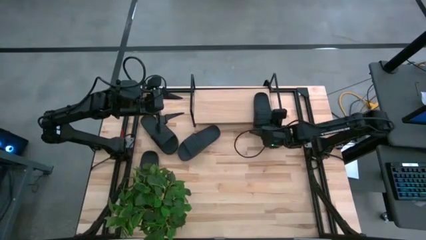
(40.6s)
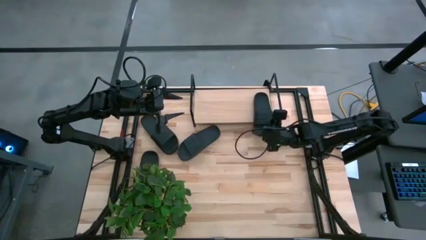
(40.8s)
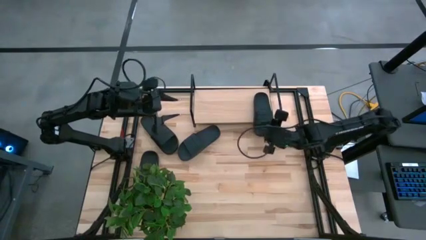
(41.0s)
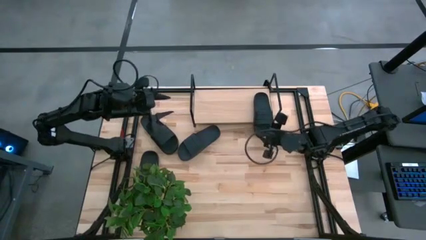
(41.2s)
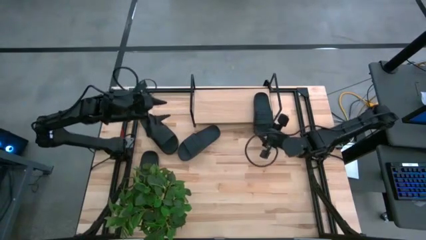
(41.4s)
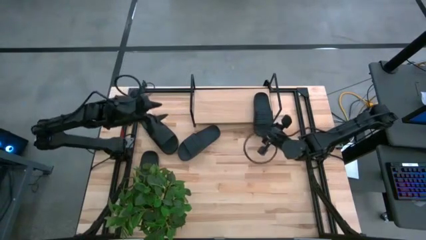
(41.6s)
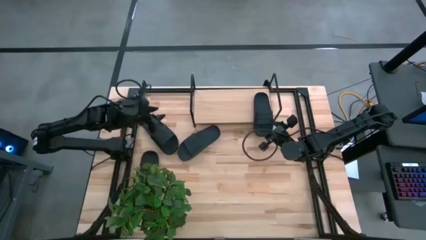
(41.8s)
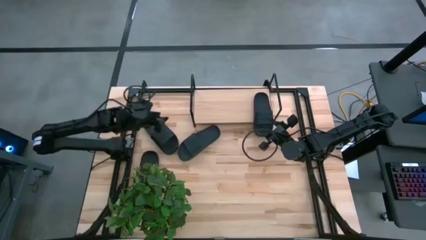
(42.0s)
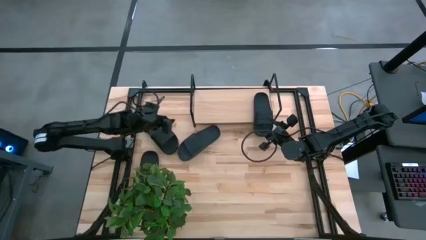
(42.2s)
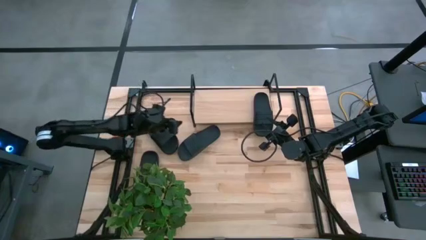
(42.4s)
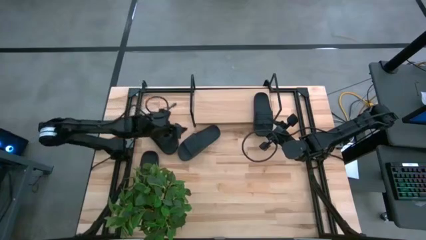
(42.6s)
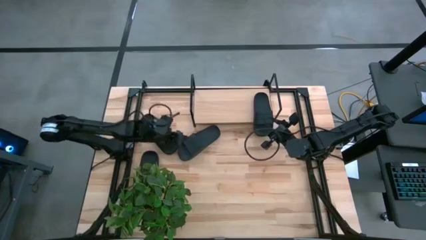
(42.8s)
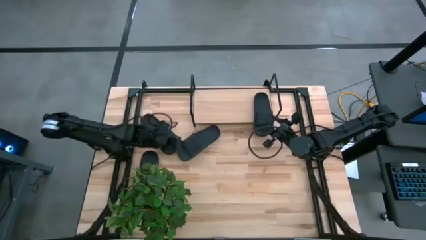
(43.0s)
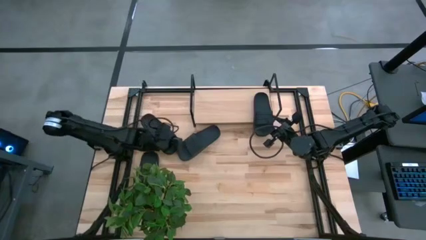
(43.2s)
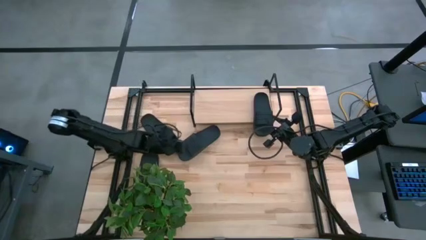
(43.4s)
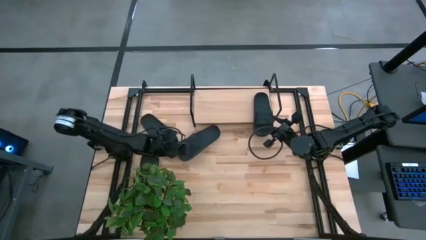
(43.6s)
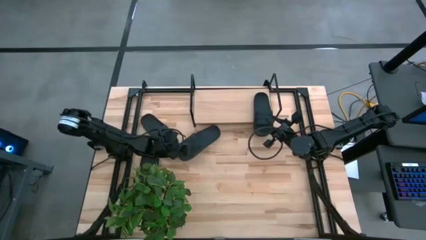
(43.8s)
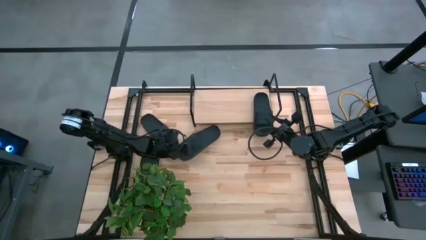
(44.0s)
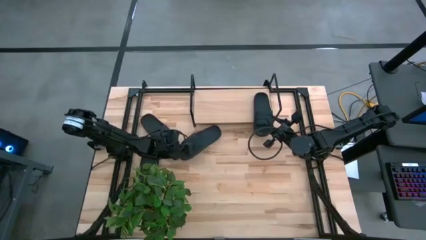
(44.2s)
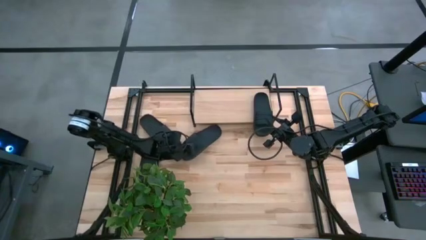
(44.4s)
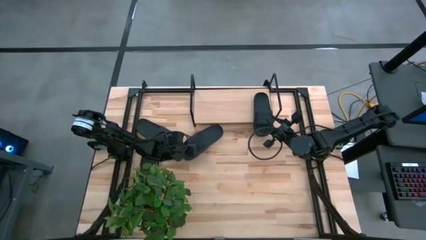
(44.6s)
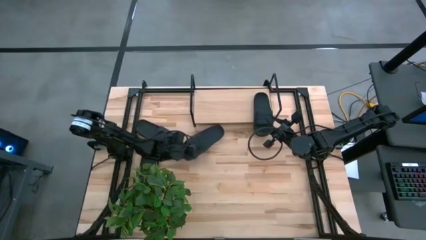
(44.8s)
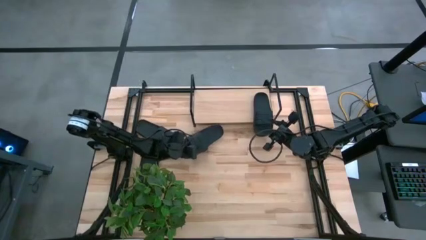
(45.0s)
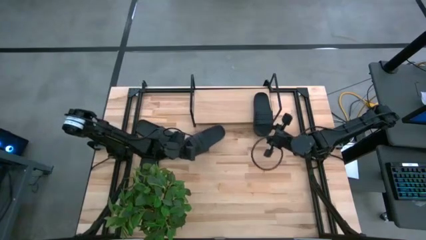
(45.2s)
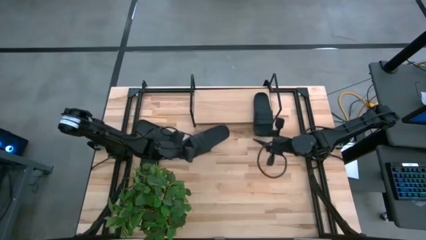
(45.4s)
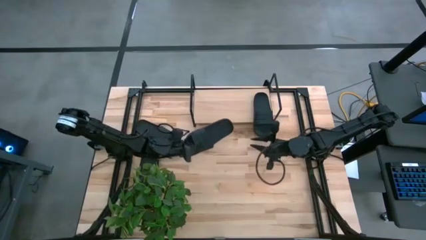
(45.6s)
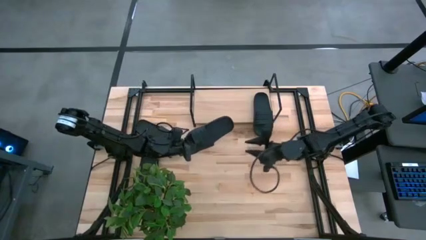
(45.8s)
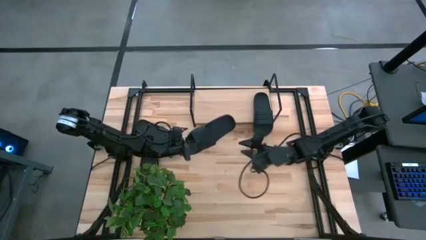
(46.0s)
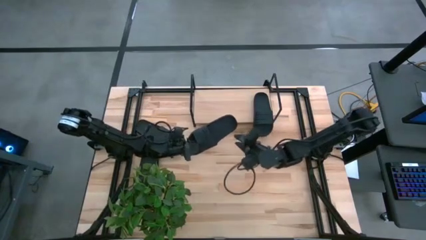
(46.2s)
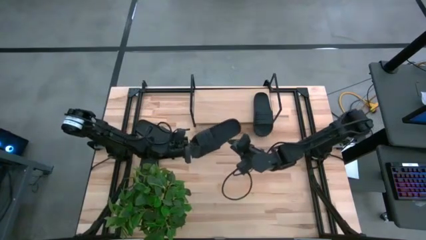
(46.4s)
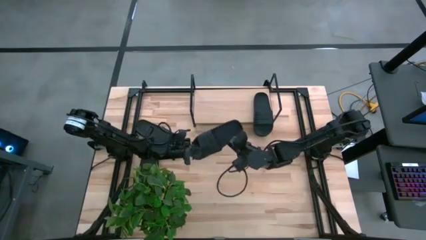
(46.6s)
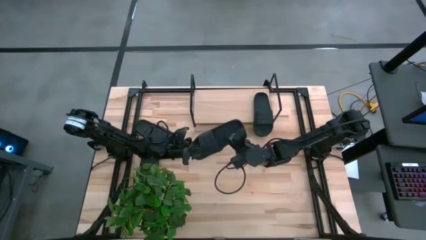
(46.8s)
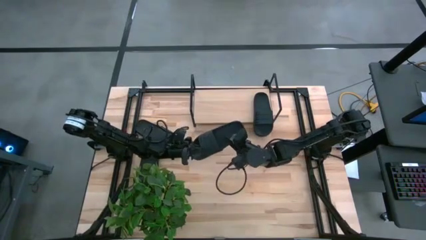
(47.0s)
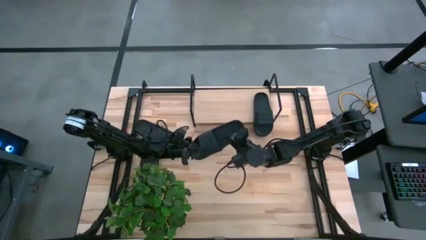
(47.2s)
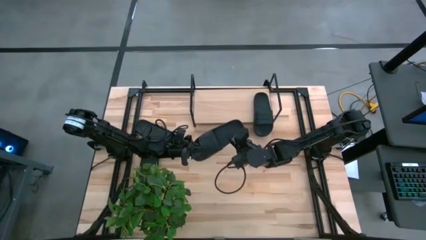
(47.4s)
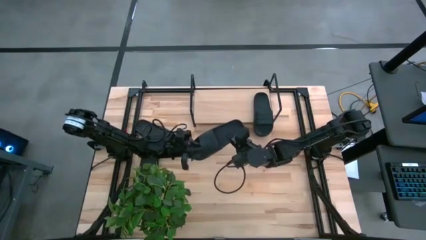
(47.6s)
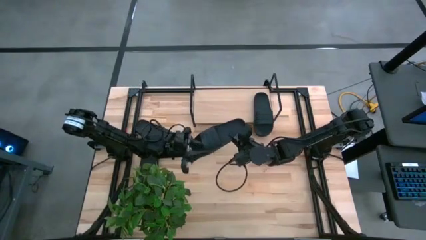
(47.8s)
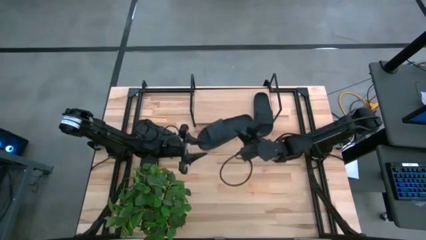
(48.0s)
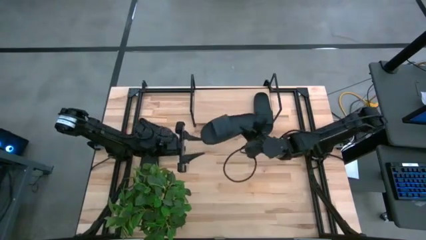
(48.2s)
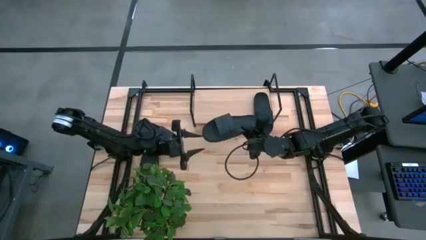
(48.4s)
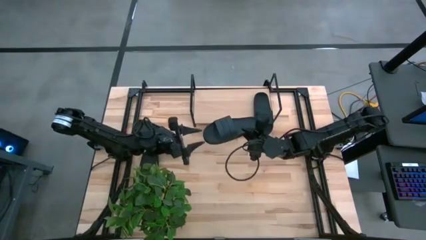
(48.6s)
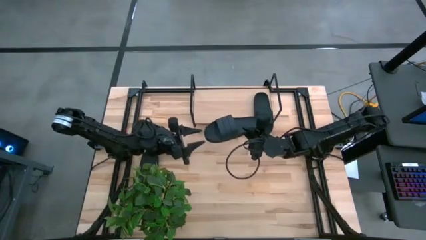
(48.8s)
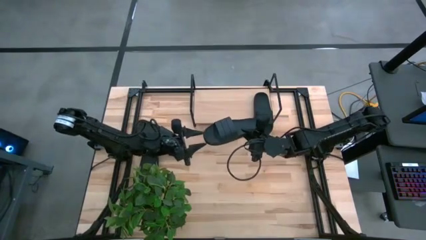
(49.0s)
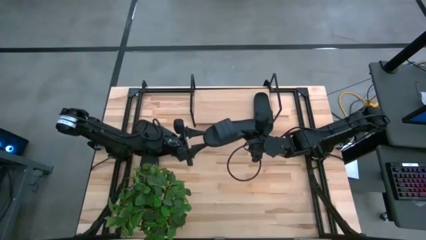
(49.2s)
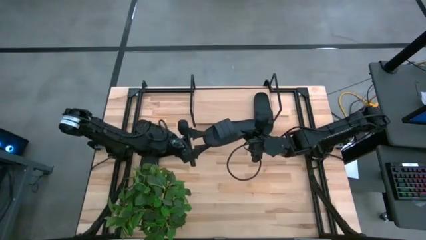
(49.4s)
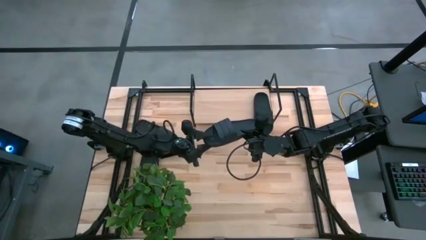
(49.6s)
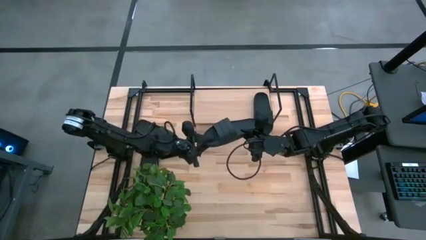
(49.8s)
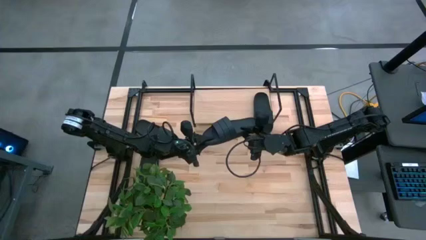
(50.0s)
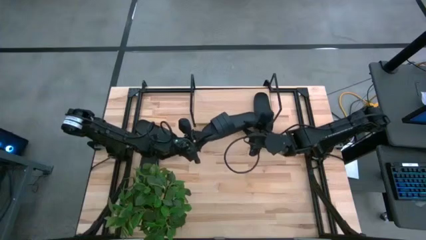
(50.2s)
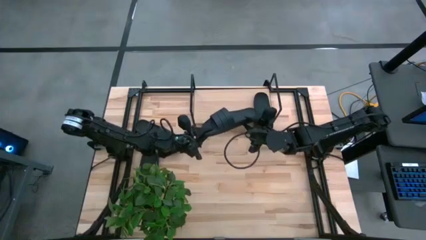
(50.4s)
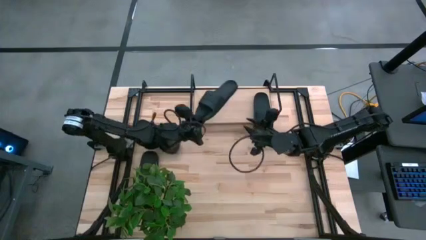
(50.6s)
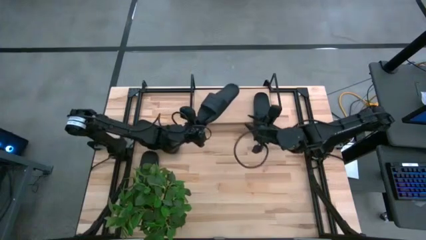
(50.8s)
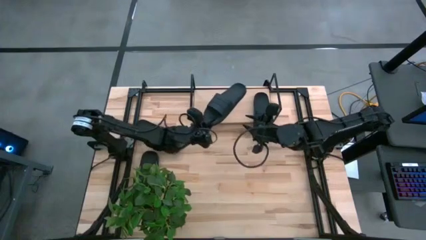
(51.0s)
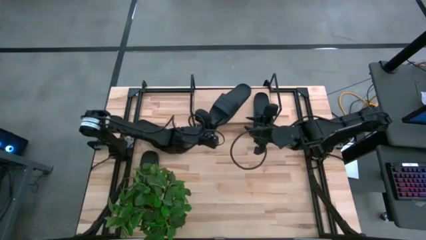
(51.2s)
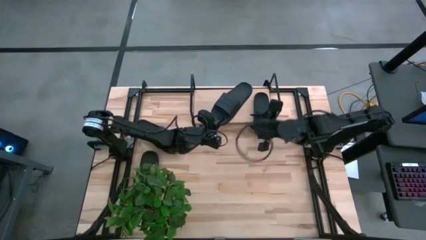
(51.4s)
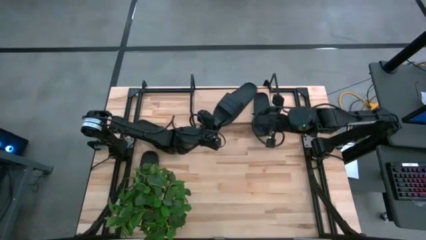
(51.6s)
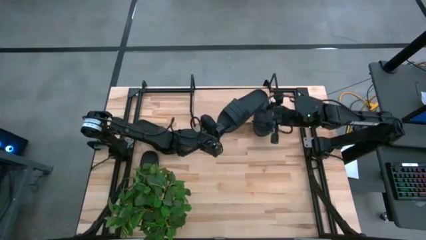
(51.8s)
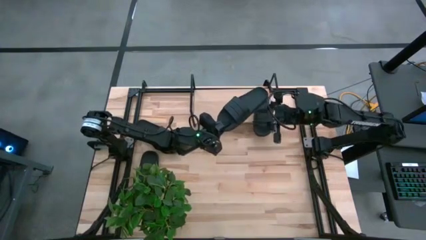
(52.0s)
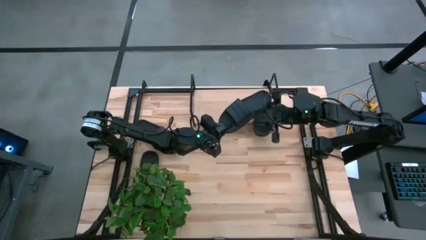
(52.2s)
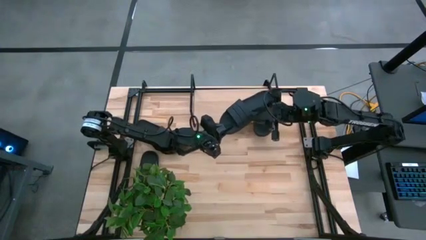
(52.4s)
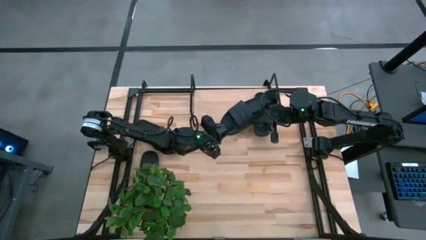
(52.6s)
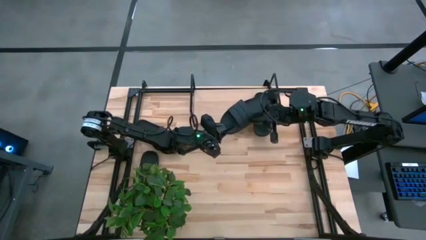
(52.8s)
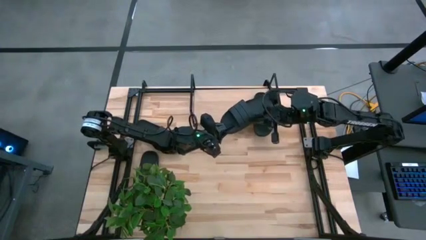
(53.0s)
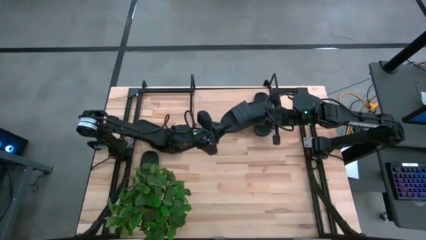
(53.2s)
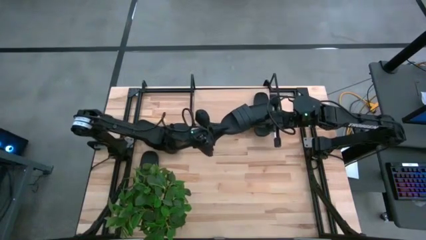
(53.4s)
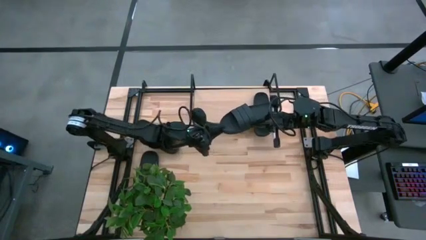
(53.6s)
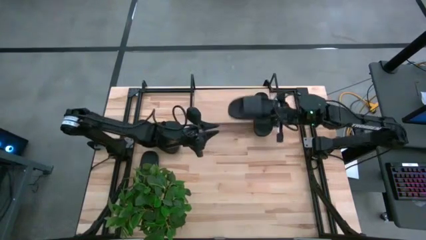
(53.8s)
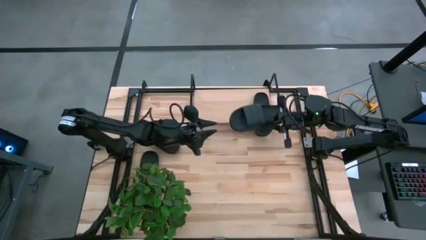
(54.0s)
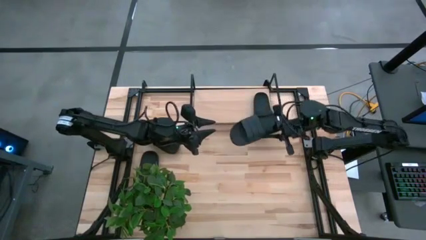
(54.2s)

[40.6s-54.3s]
Task: Pick and place slides into the shelf
Put the black slipper on the shelf

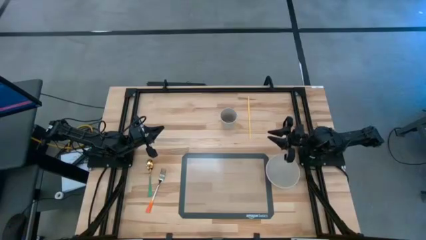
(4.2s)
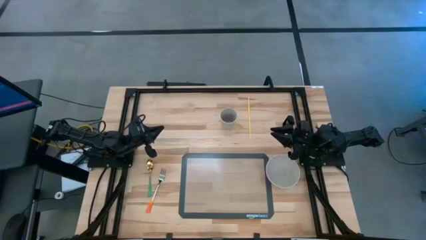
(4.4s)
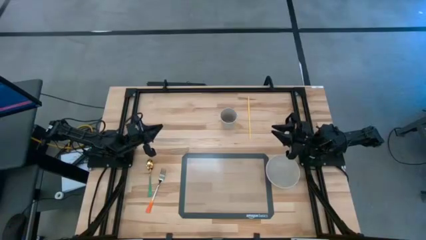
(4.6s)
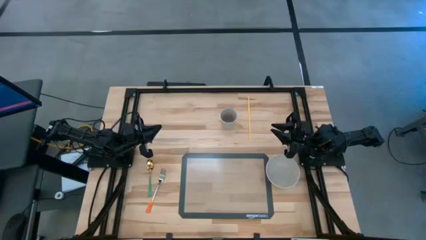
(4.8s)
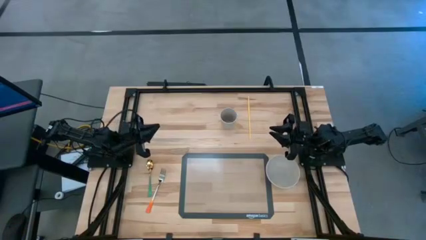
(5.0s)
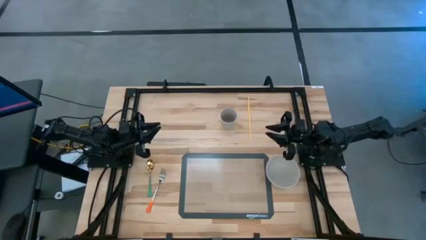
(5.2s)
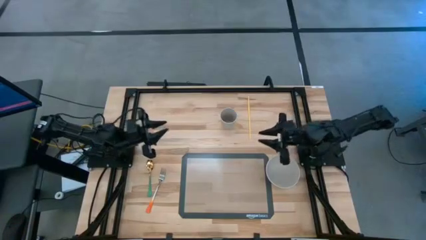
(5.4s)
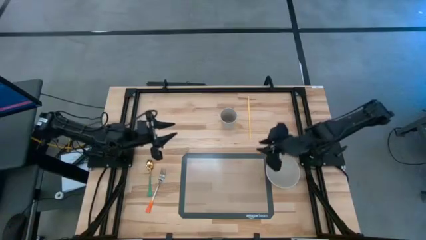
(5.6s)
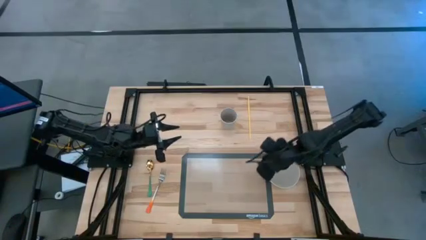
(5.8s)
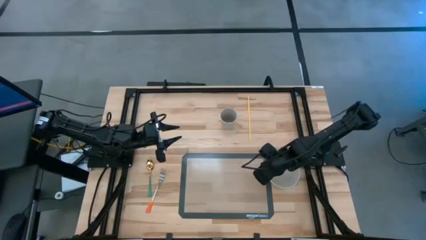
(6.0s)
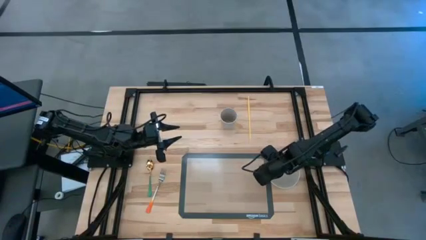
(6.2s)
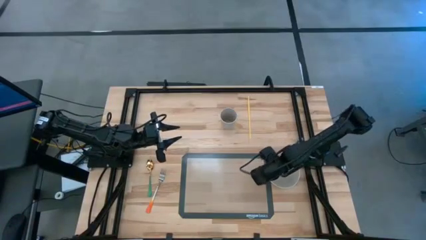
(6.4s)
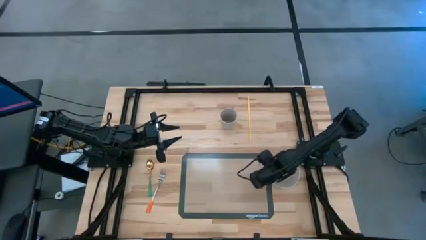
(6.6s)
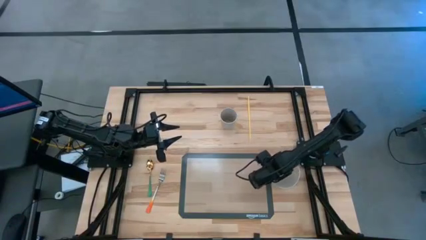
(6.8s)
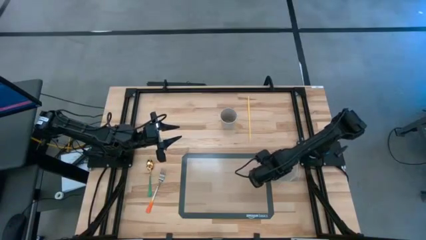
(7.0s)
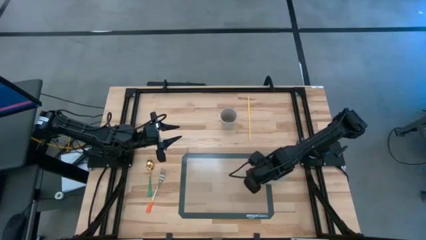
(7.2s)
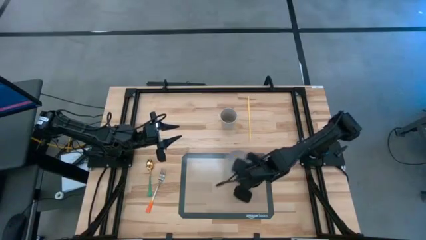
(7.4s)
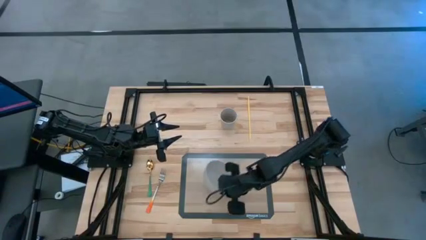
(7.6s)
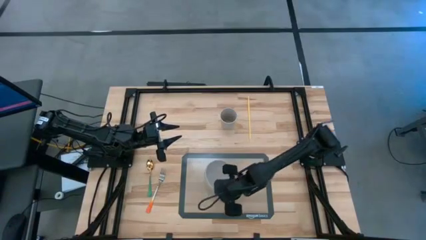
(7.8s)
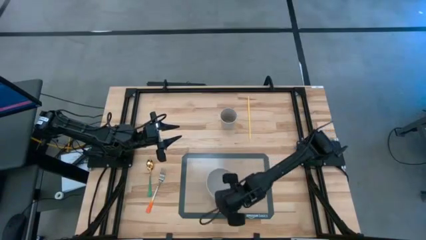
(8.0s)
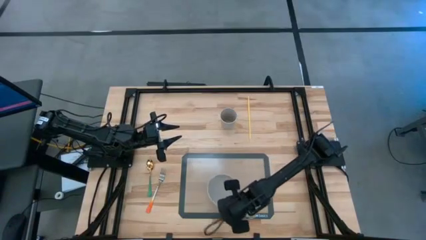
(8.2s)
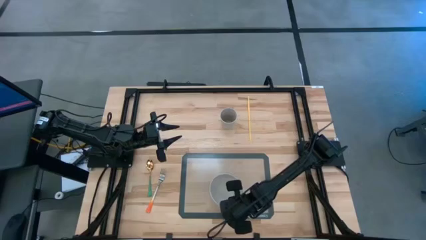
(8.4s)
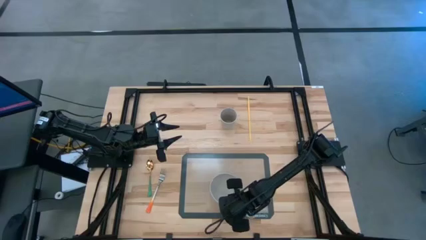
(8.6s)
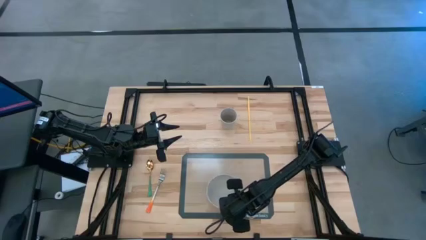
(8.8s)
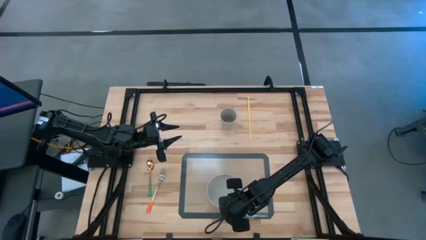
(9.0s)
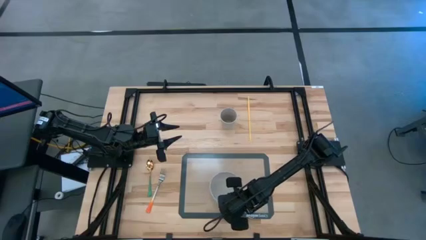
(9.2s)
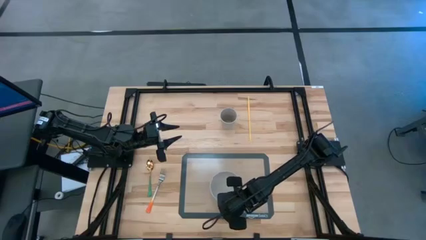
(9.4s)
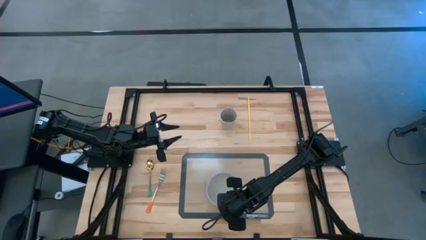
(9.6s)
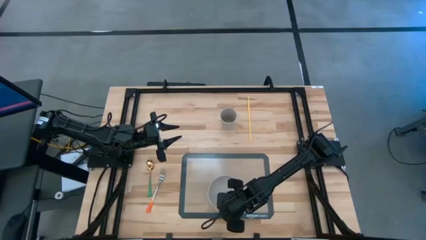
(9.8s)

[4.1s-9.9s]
Task: Pick & Place Utensil
Put the gray bowl on the brown mat
